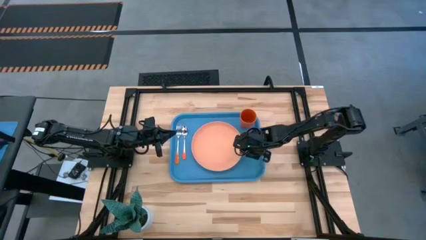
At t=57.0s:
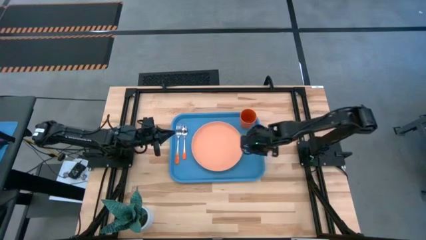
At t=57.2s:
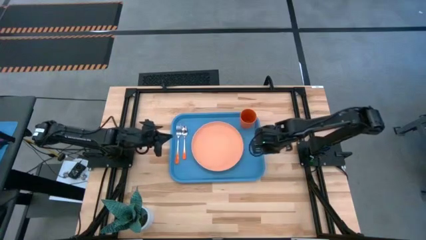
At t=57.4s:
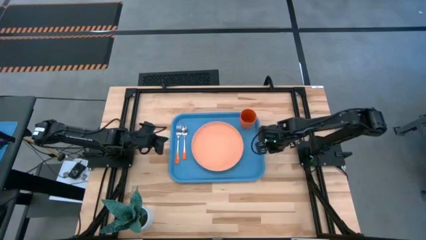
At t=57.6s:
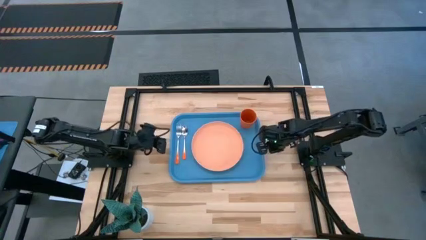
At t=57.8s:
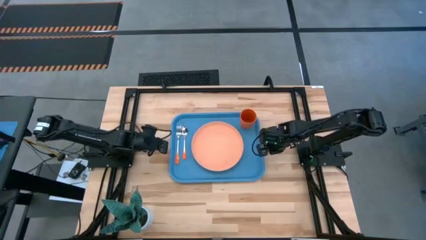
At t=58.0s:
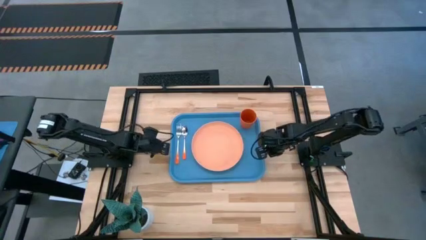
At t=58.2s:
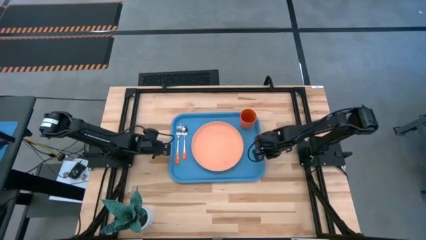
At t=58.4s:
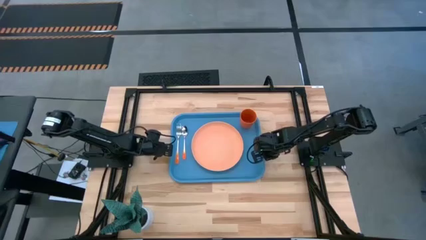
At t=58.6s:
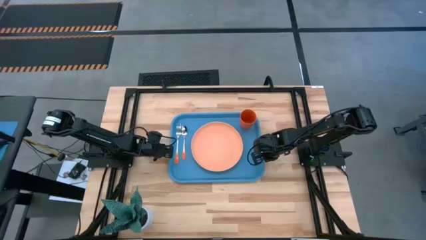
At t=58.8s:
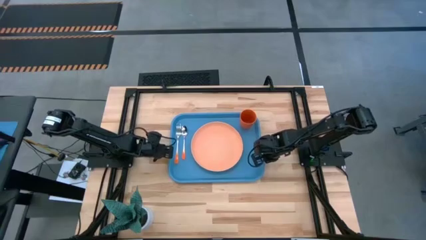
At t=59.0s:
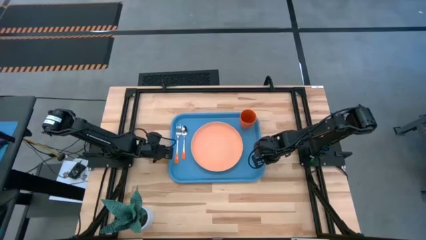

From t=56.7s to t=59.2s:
Task: Pick and place plate/cup/fork/spoon on tray
Adjust the blue serving tray

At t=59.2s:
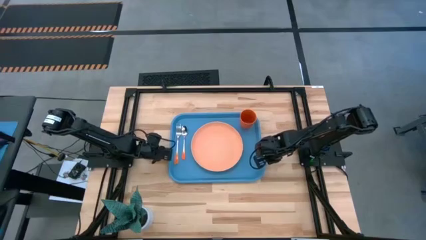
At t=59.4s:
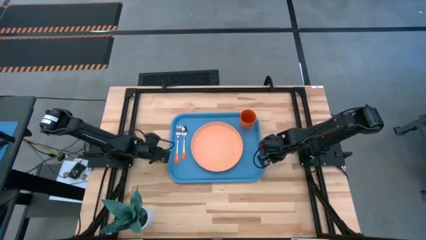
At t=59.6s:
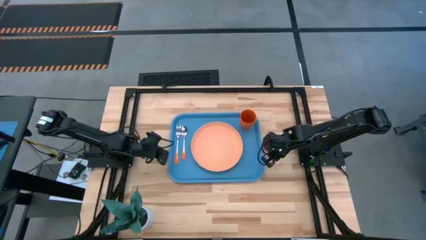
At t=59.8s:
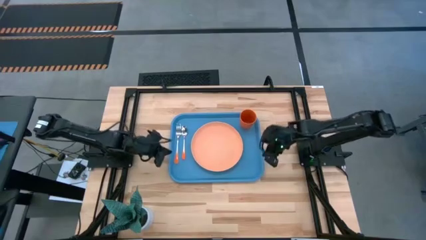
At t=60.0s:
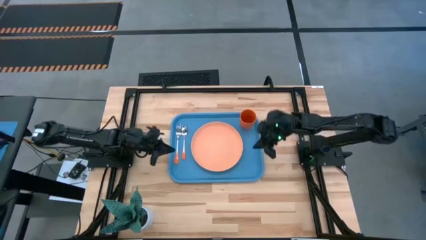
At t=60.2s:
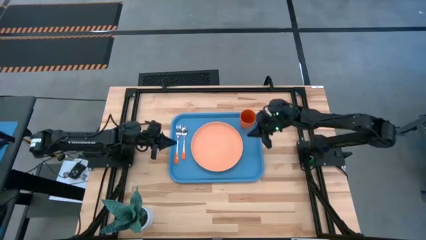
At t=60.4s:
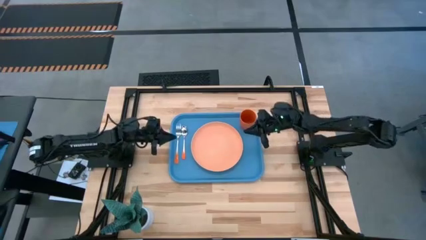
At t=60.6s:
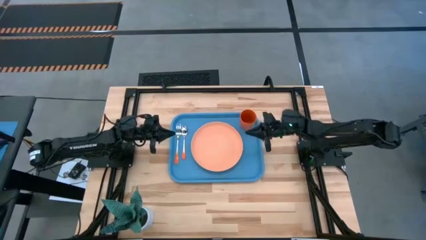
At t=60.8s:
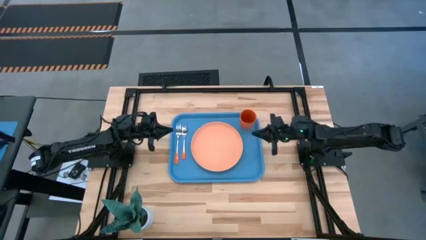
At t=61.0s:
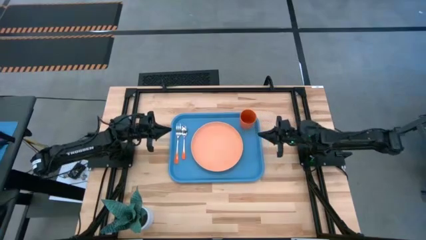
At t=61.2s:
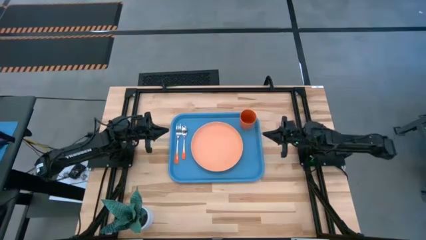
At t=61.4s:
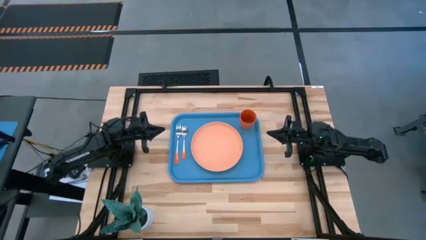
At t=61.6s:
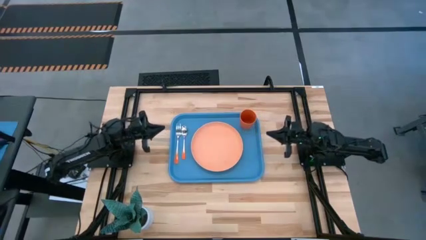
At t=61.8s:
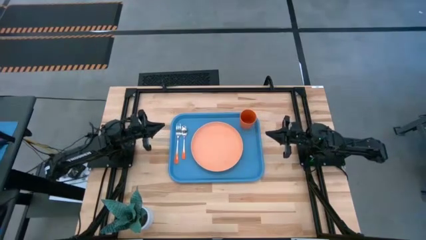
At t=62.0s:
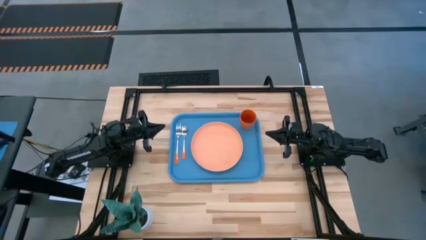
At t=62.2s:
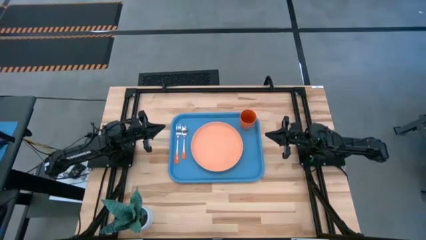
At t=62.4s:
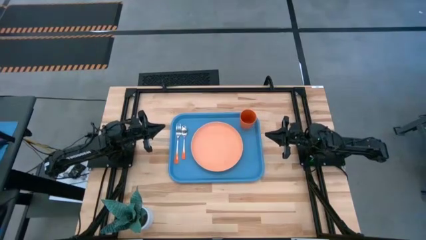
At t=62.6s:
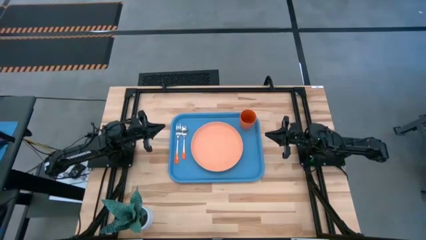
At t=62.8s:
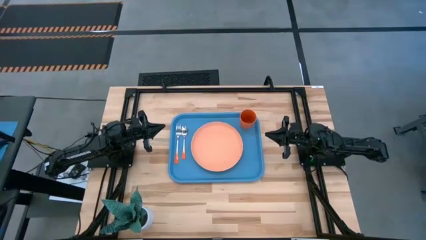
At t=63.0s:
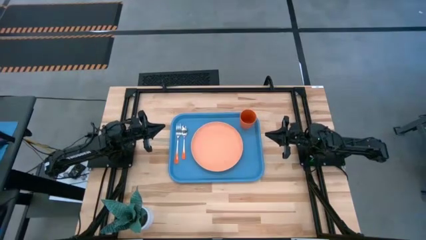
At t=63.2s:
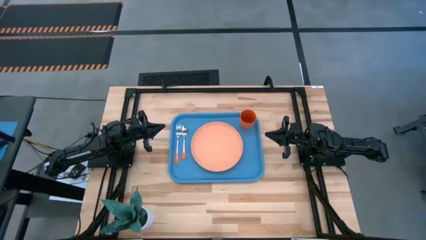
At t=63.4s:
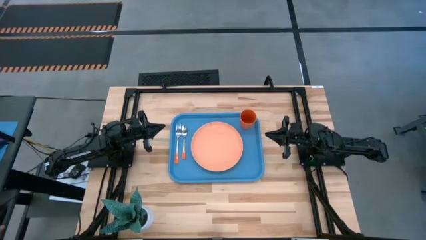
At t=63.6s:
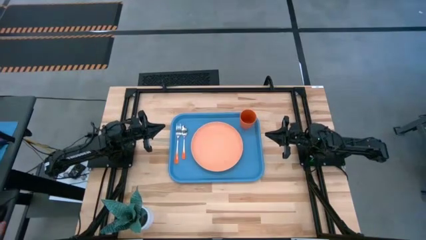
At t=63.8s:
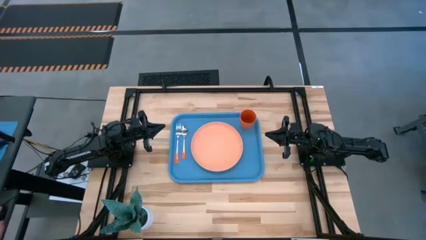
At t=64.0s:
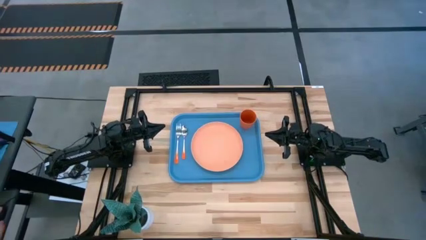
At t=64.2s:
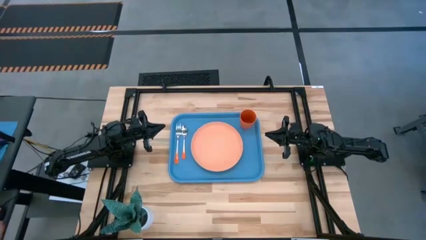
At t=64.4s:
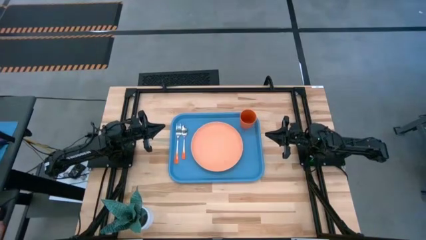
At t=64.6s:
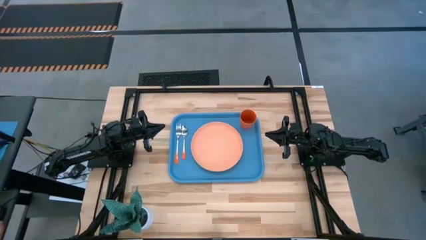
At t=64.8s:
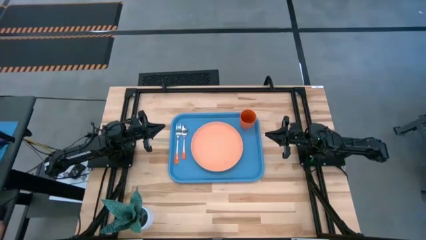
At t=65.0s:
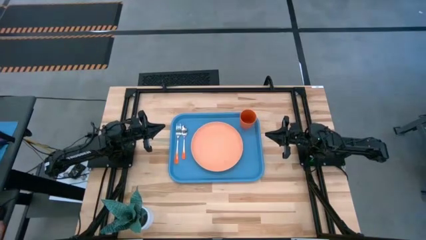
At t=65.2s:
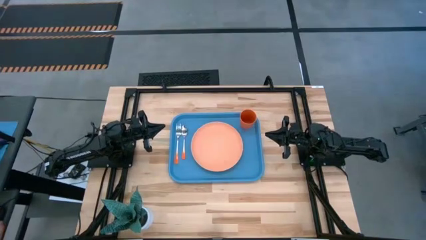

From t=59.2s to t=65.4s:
Return to Home Position

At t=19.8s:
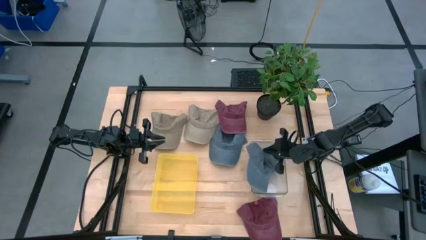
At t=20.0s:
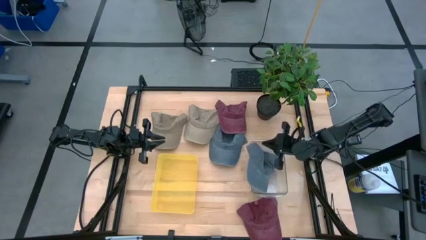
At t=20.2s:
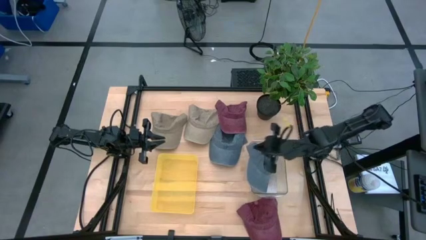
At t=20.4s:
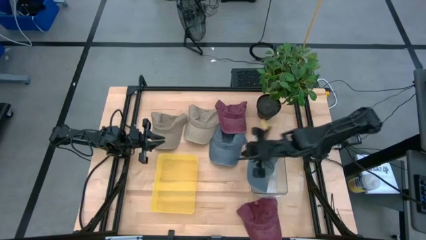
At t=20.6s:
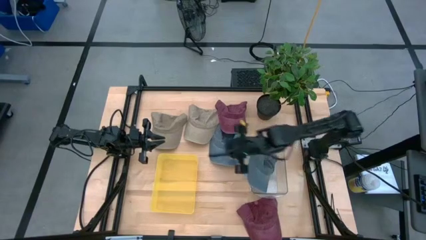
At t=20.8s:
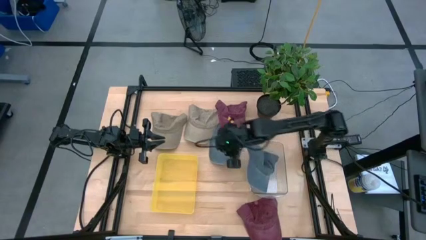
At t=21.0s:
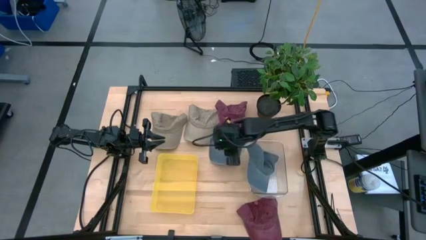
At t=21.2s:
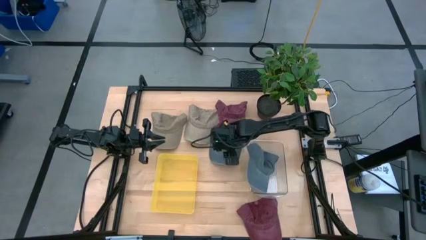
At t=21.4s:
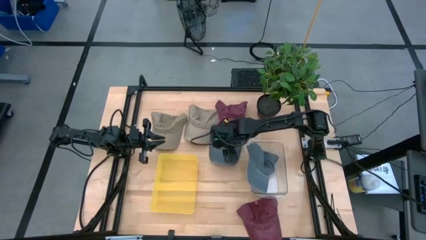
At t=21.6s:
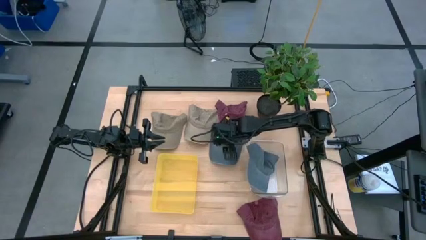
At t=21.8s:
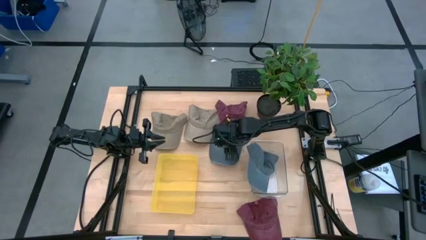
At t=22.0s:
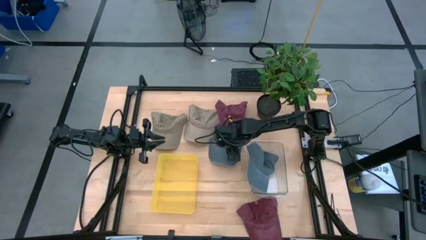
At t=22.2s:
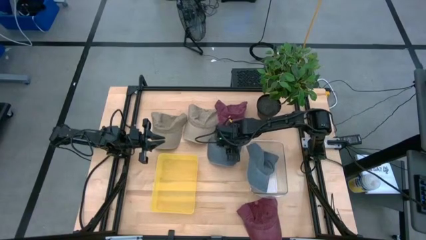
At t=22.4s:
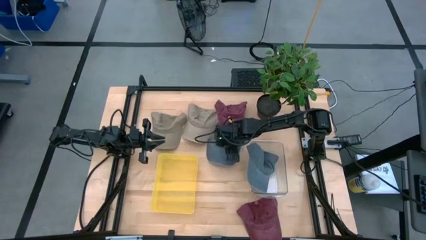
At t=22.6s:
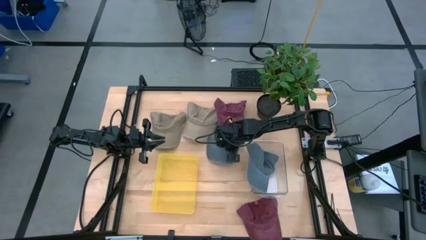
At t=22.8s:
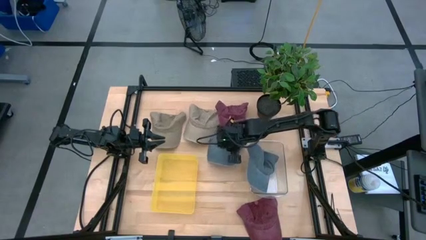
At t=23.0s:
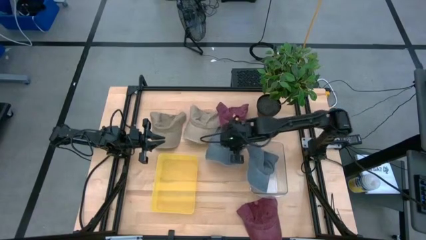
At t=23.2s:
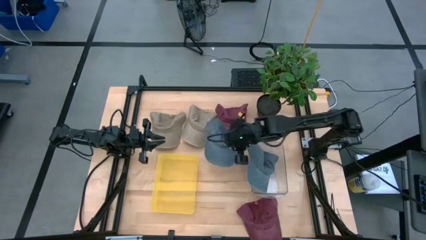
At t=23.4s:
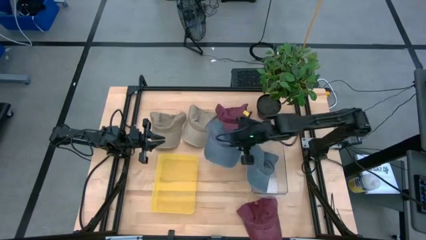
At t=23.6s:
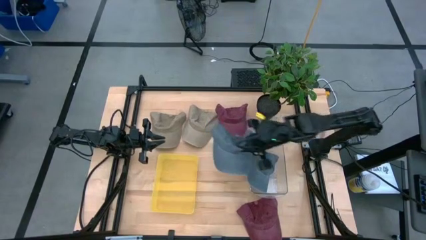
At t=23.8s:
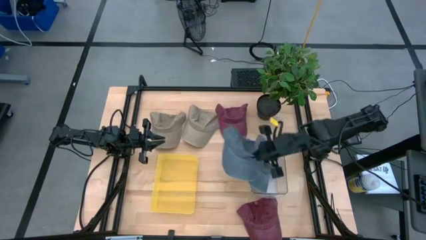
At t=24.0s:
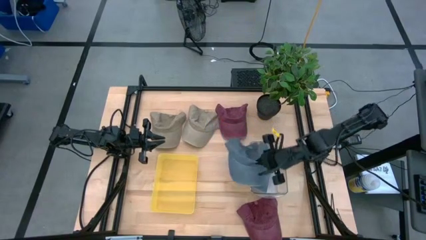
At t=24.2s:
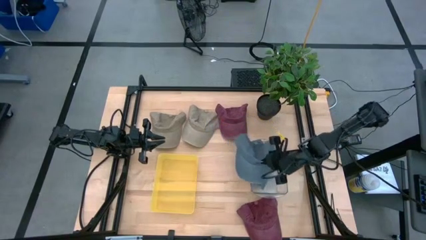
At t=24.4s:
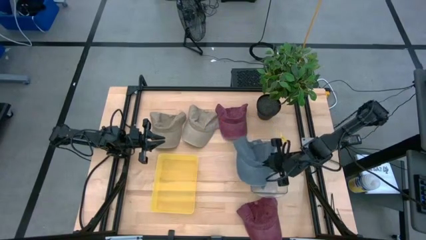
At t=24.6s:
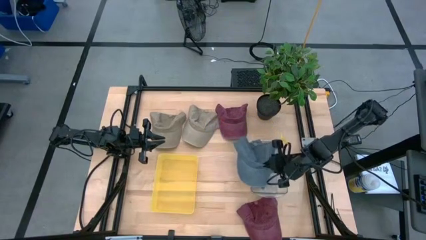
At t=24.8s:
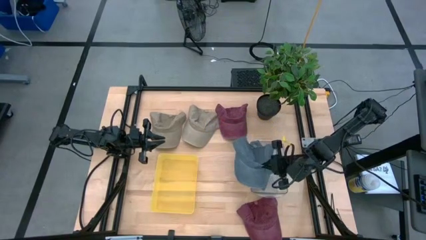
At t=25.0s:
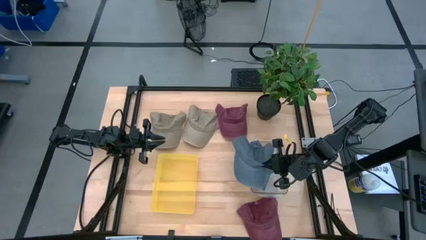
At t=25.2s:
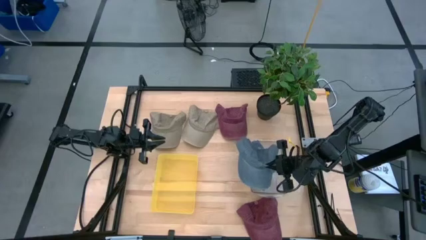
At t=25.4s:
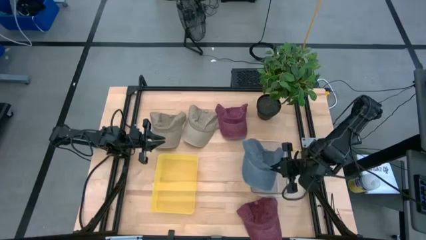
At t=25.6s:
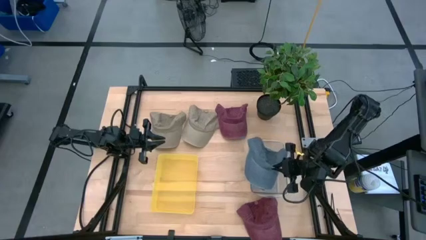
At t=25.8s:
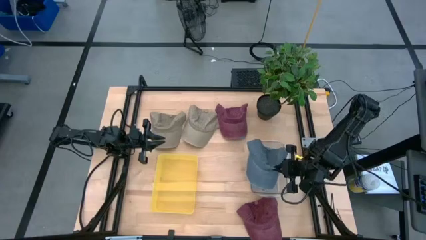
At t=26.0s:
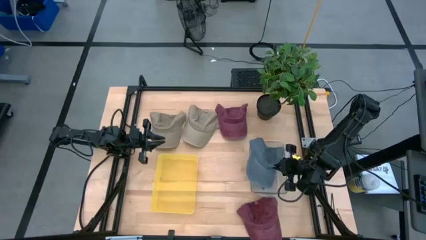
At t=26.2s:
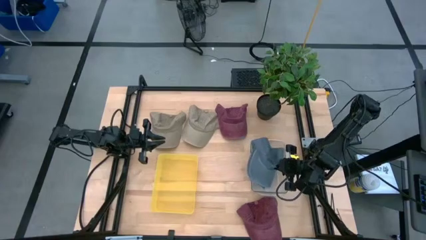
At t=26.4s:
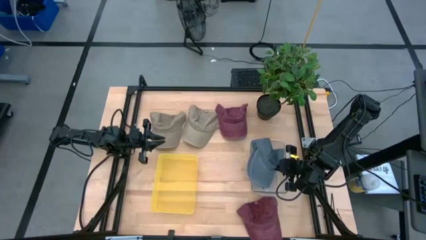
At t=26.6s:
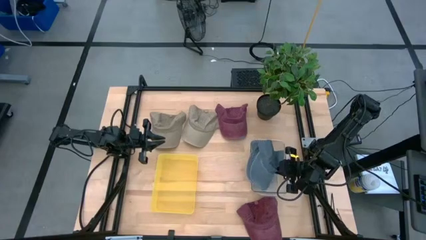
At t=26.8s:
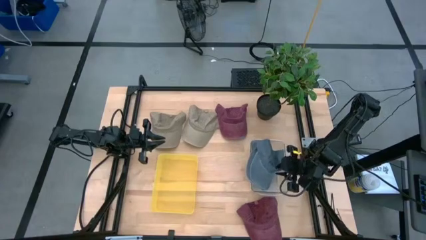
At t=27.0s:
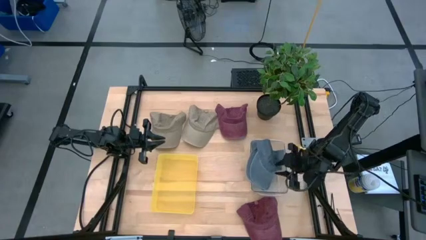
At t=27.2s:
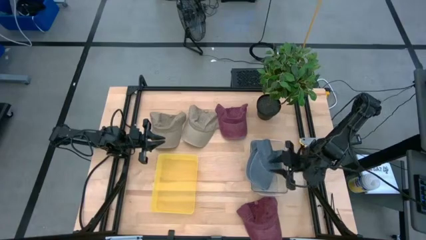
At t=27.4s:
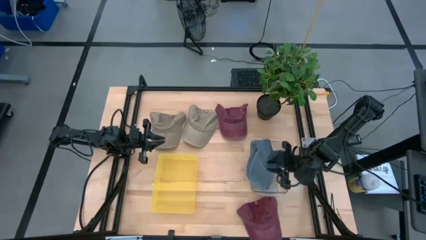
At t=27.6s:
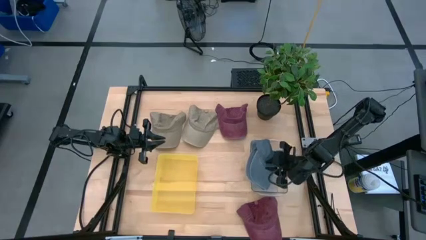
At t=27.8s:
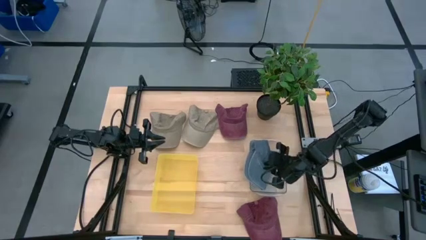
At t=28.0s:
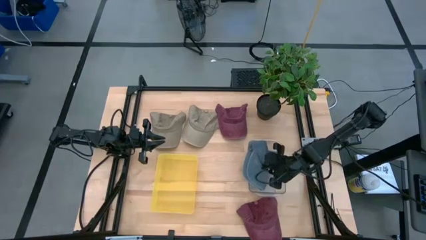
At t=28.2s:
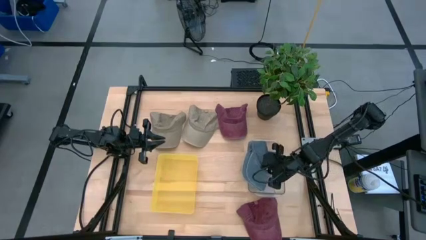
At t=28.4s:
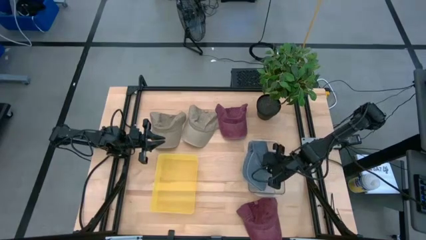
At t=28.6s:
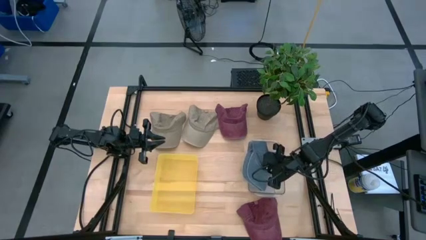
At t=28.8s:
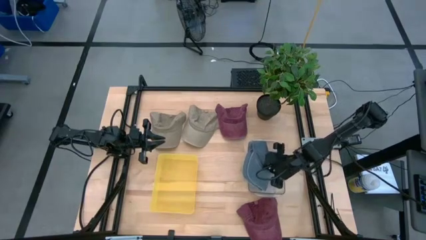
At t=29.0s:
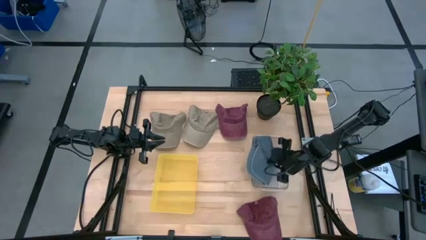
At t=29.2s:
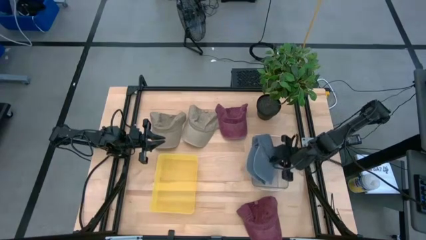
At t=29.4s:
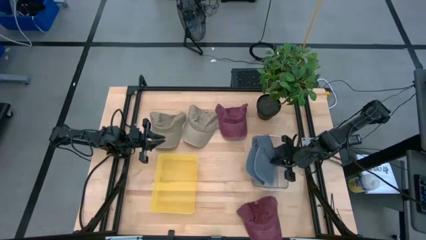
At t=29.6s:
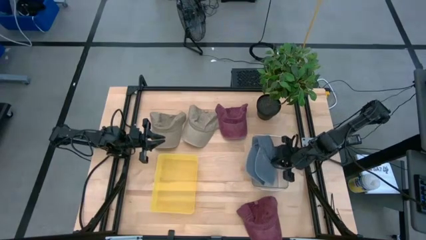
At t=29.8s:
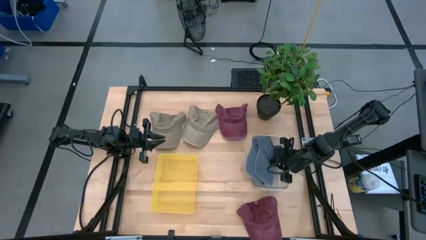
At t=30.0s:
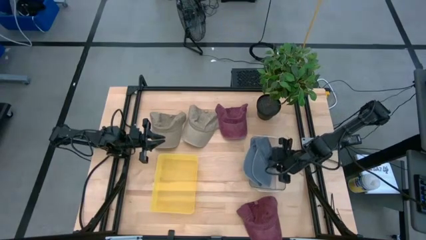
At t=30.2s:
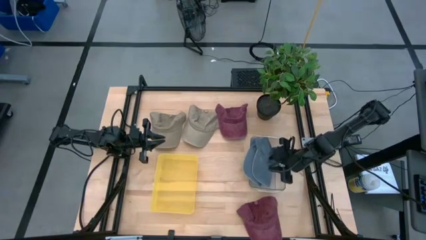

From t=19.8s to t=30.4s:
Task: Pick & Place hat
Put the blue cap into the transparent bin
